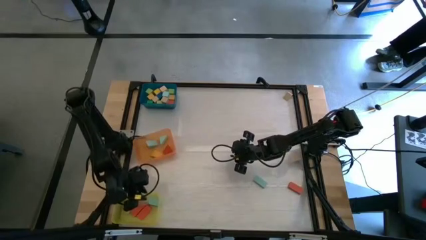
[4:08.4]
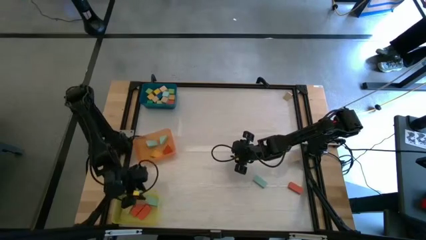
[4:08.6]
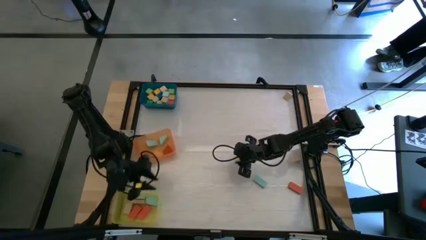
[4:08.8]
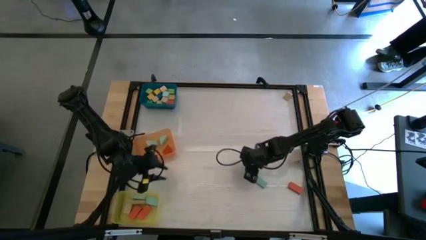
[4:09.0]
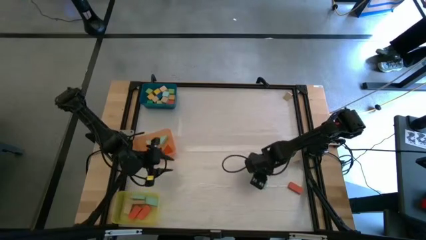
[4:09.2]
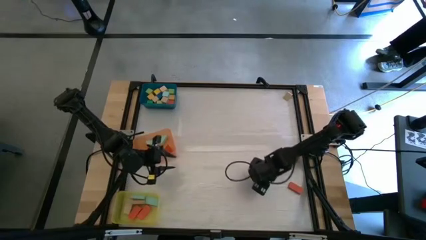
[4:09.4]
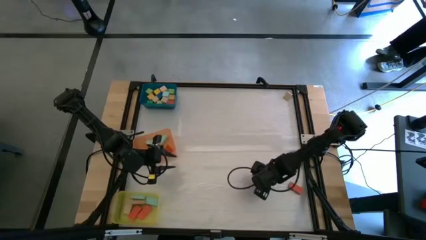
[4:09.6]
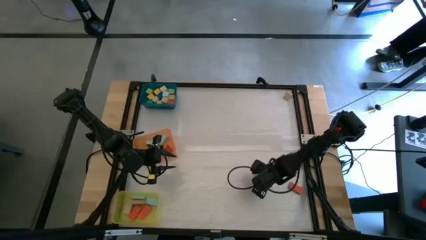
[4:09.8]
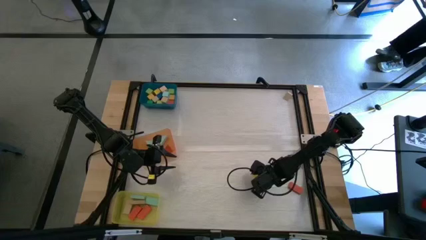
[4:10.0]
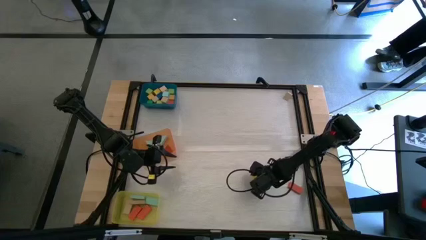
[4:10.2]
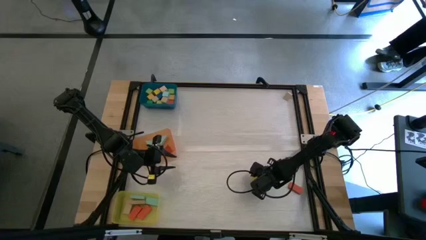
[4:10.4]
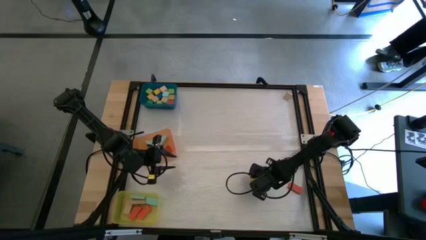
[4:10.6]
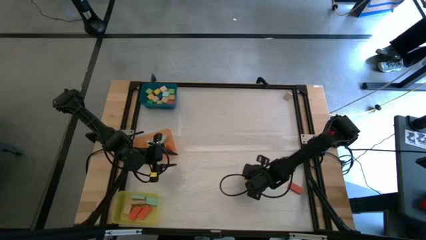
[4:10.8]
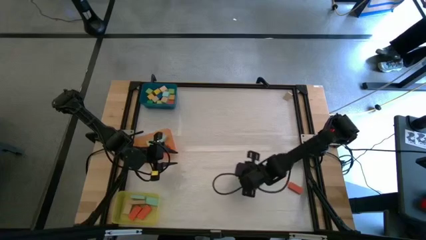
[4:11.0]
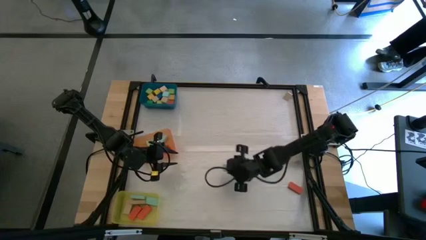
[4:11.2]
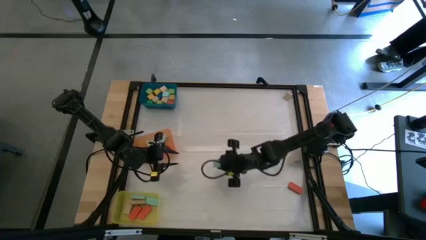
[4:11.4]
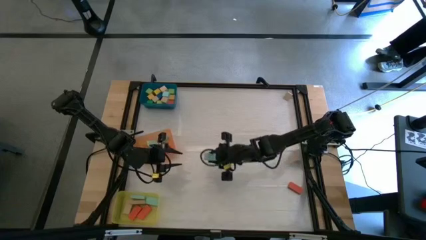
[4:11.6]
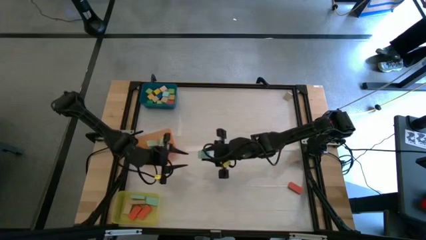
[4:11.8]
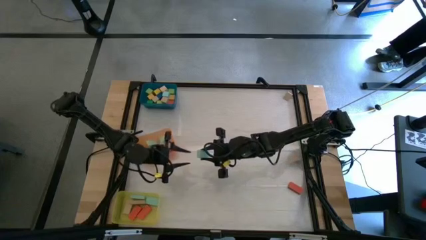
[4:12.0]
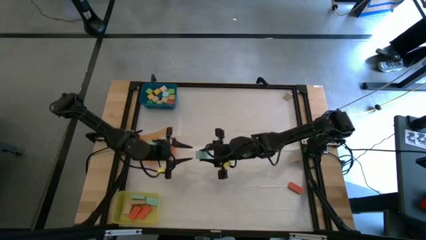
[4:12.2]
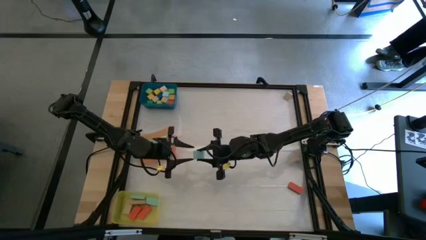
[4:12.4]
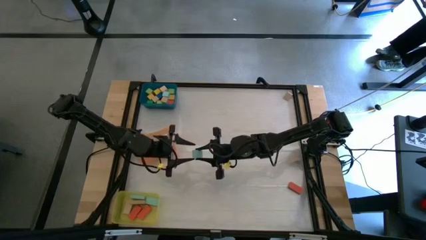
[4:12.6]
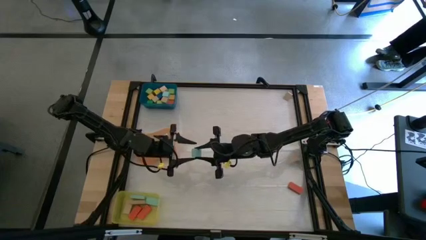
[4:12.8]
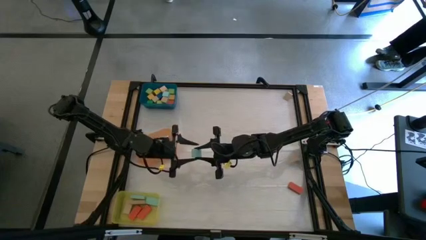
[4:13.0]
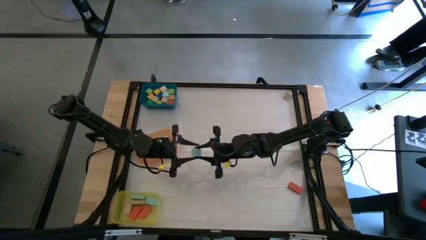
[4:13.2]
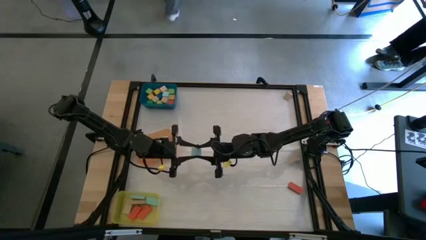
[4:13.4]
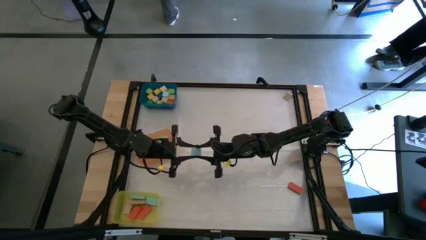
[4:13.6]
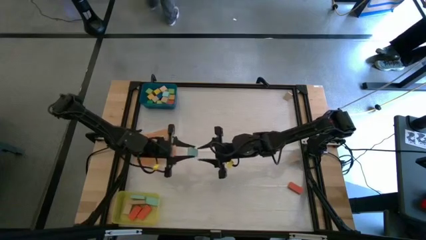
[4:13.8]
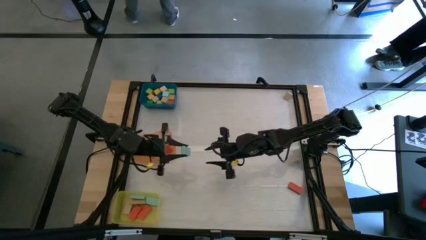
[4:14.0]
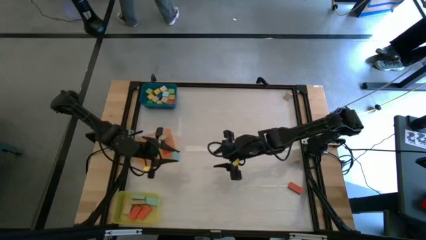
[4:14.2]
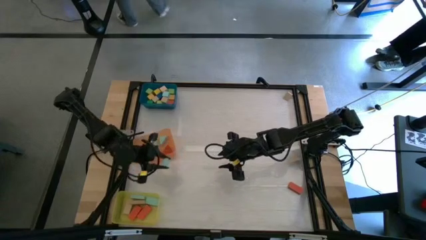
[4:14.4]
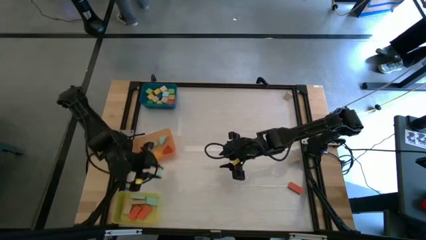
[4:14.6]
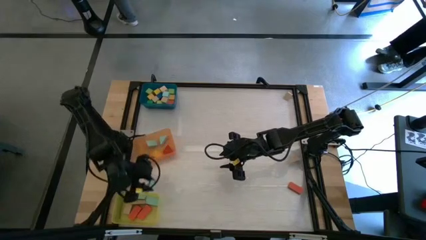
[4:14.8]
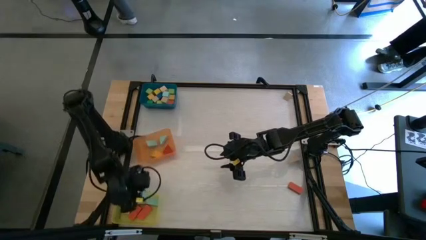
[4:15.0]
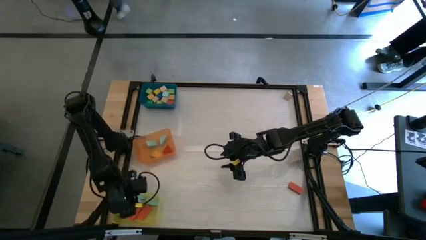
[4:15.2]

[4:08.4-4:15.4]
Task: Sort blocks by size
Put the light blue rectangular block into the yellow bin

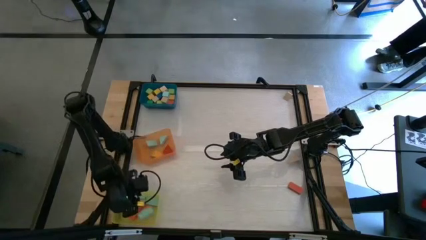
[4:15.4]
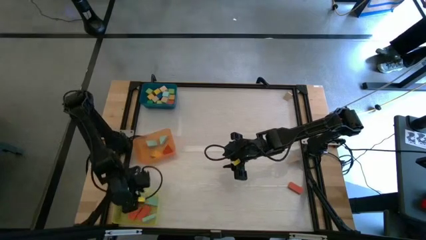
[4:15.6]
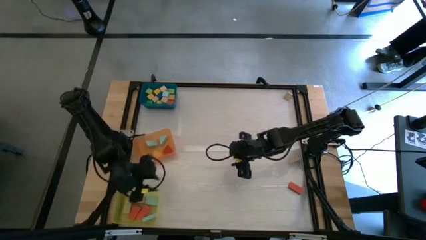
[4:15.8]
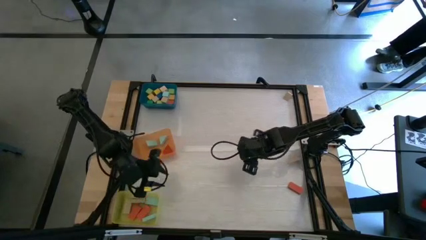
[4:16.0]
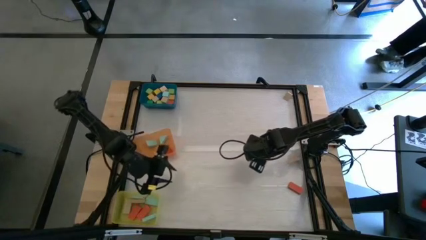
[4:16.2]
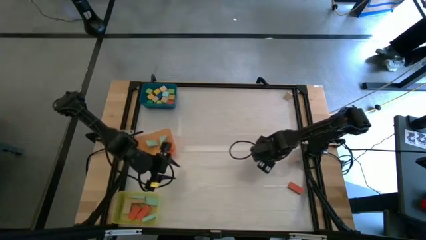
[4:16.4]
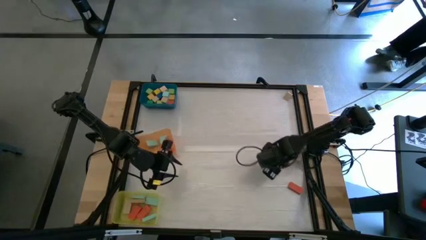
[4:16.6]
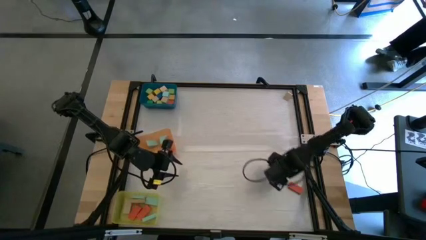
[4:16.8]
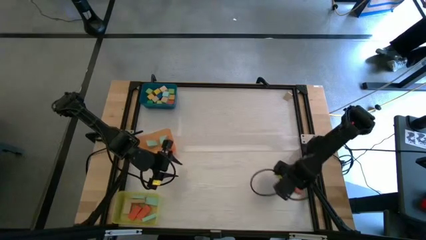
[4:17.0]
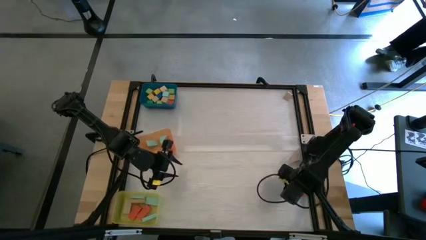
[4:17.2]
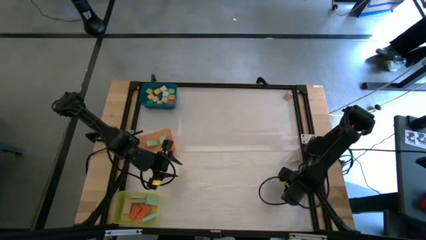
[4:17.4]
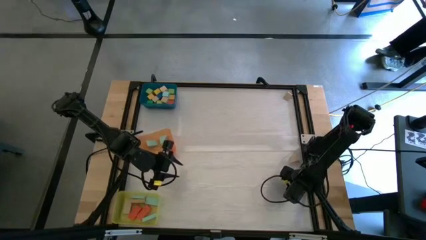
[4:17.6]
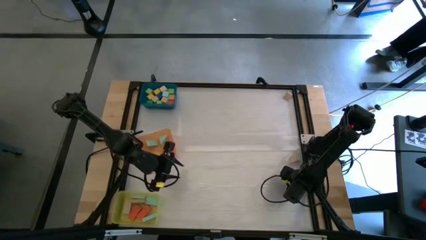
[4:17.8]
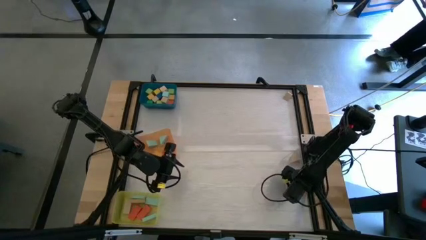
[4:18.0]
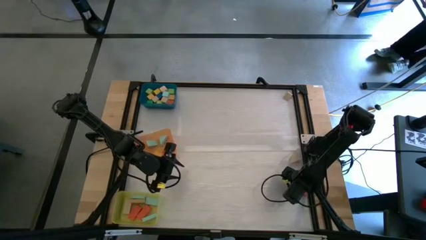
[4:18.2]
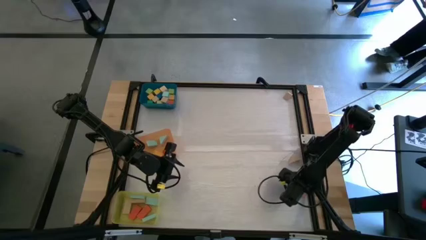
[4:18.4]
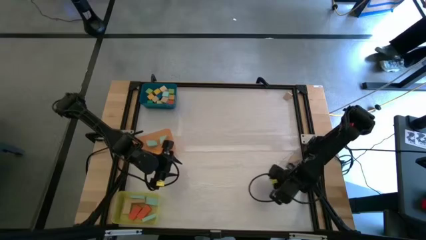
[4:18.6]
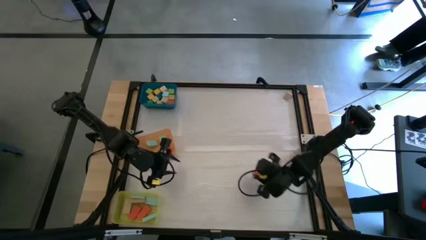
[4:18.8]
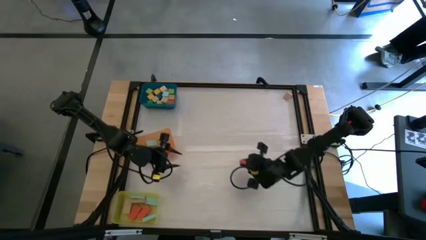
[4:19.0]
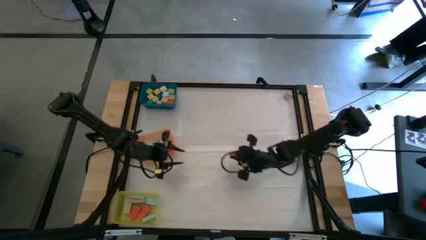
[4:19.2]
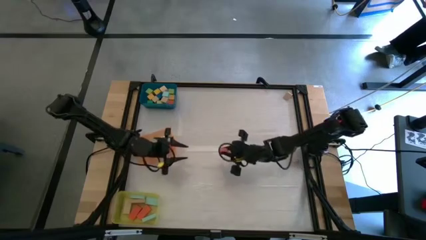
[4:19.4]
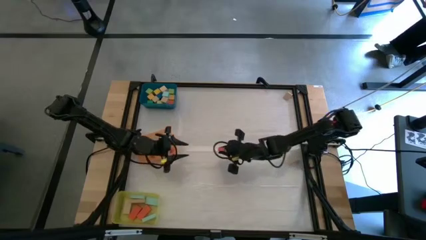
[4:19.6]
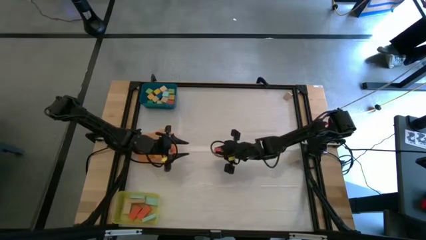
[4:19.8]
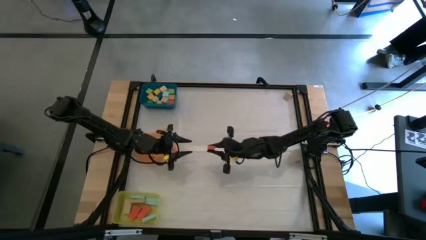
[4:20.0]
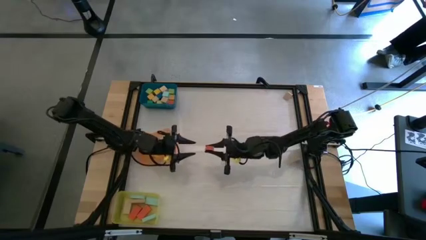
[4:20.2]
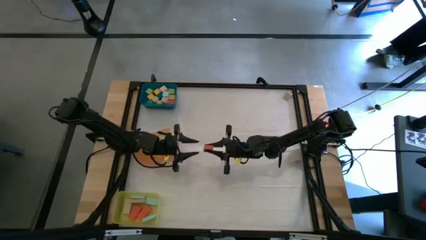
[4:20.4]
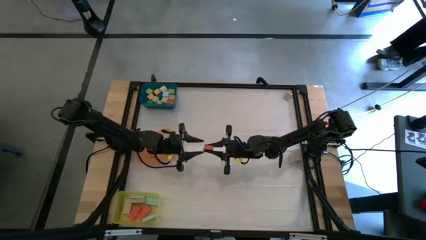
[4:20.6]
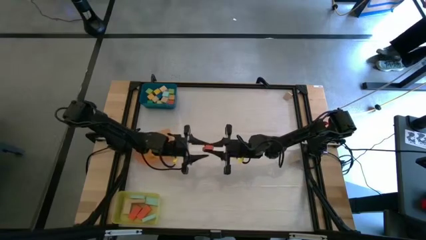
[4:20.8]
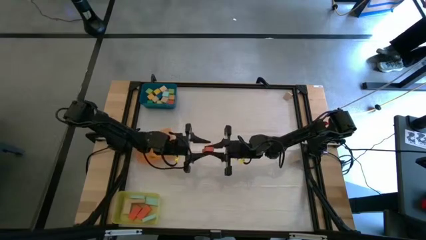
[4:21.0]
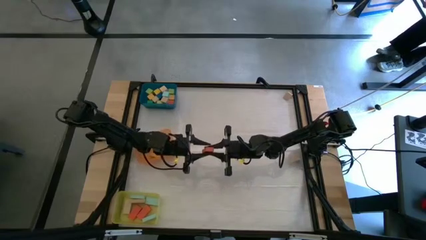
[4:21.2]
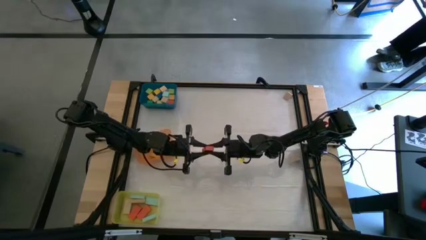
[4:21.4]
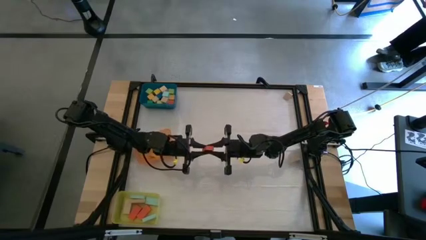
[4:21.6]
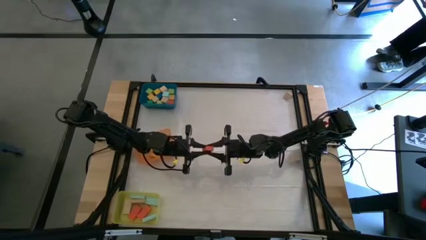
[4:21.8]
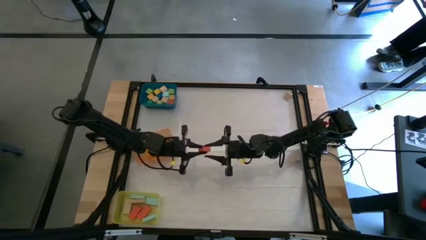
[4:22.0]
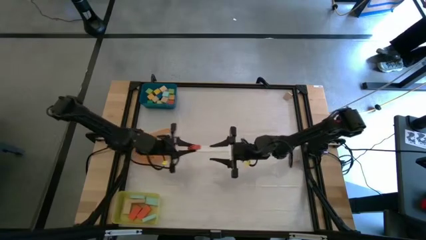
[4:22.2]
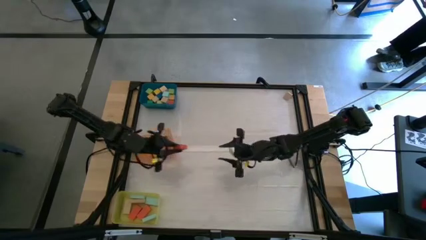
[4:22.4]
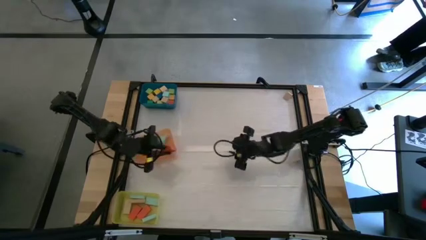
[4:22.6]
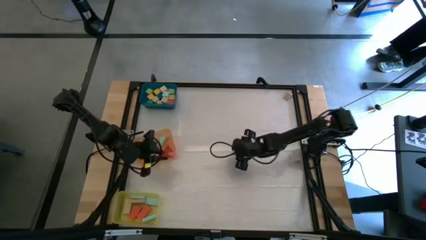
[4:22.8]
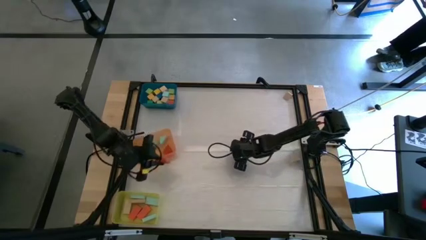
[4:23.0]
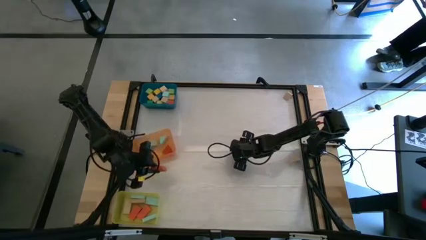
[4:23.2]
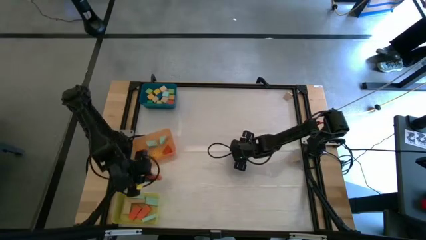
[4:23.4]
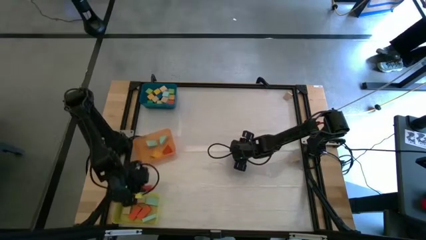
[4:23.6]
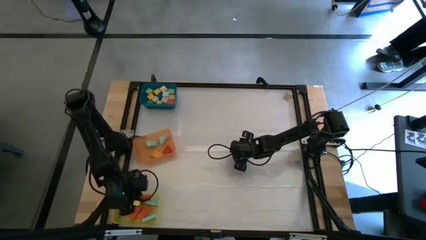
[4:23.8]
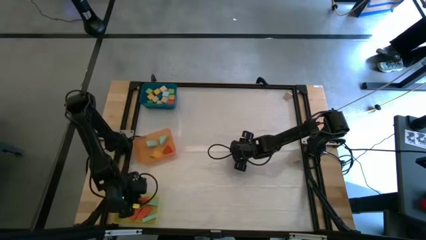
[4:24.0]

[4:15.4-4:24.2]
Put the red rectangular block into the yellow bin
